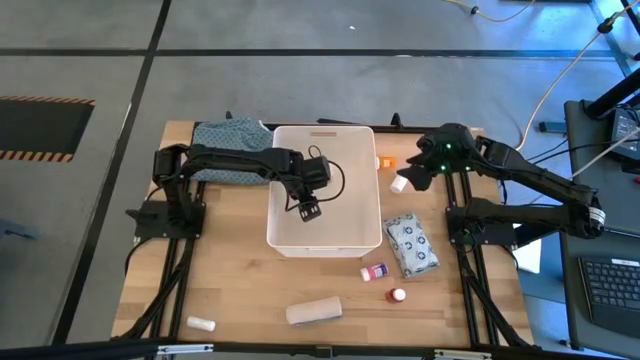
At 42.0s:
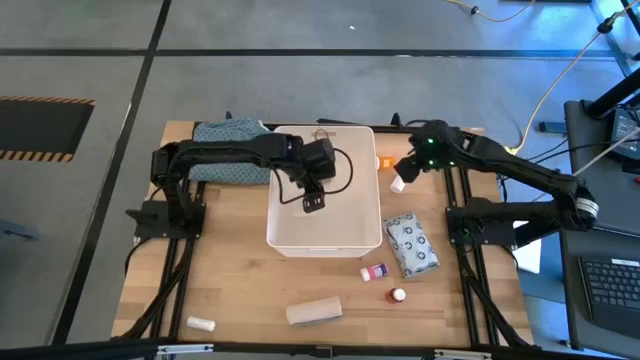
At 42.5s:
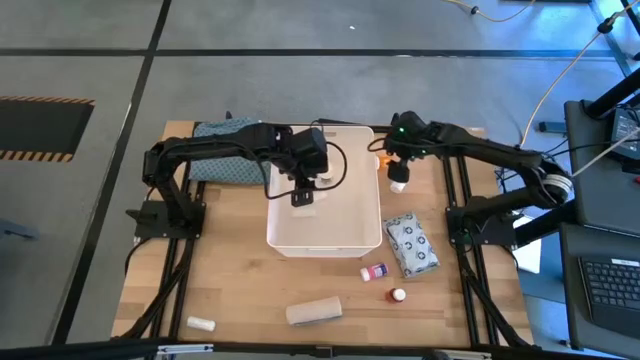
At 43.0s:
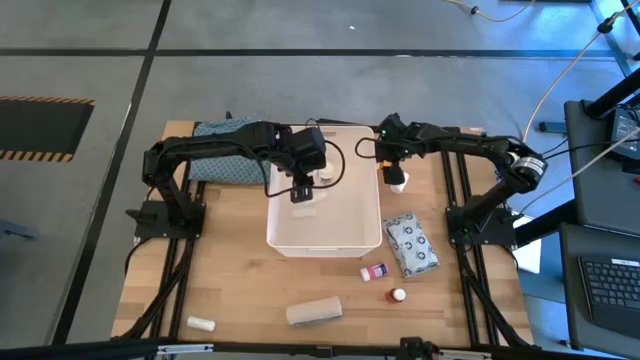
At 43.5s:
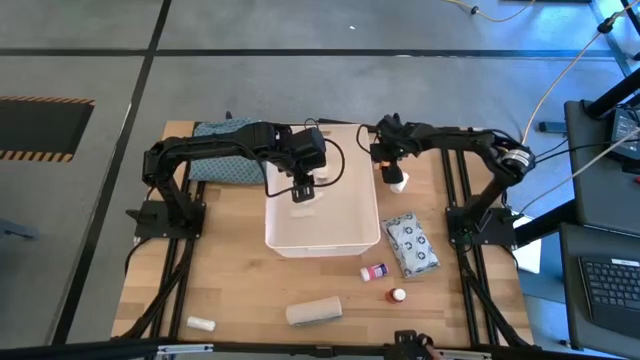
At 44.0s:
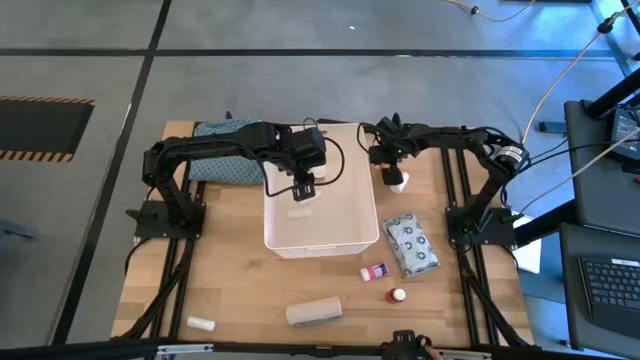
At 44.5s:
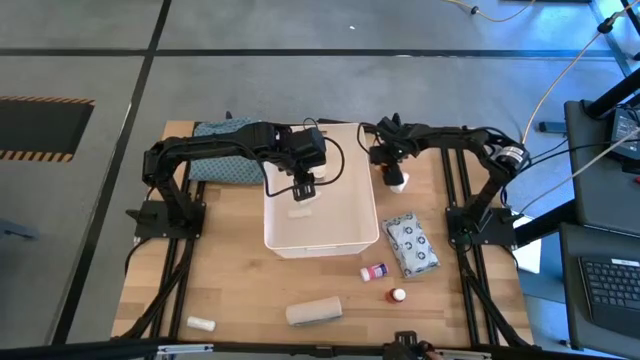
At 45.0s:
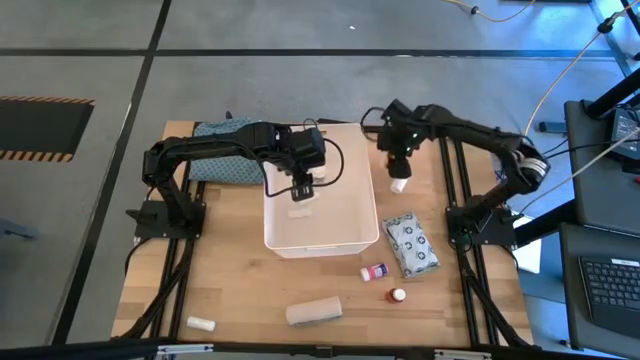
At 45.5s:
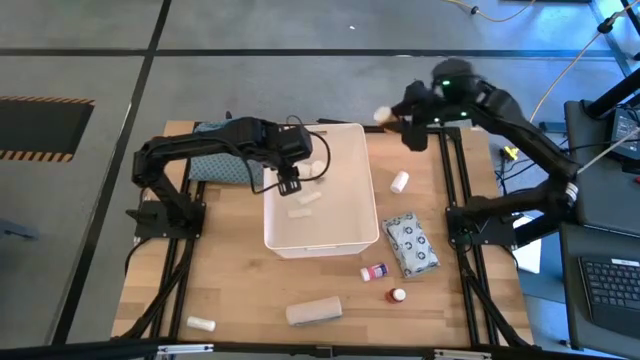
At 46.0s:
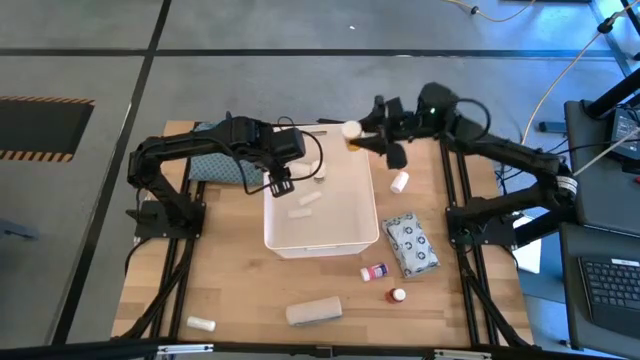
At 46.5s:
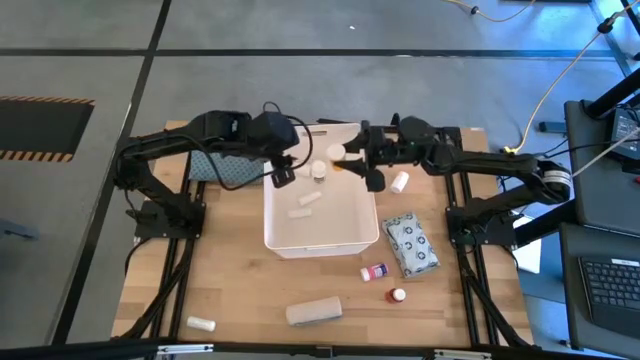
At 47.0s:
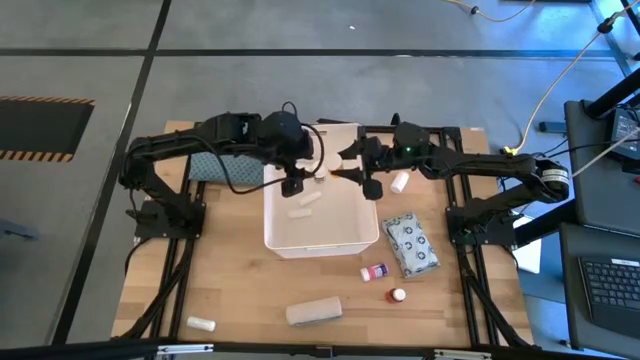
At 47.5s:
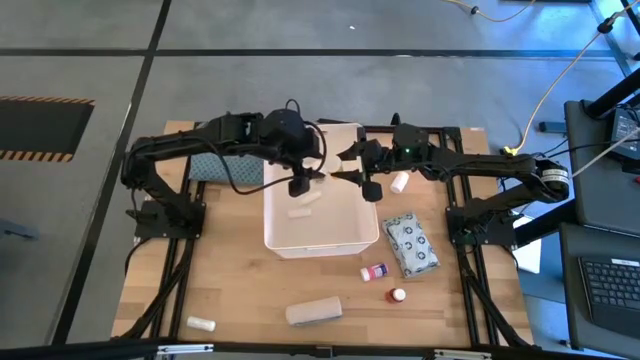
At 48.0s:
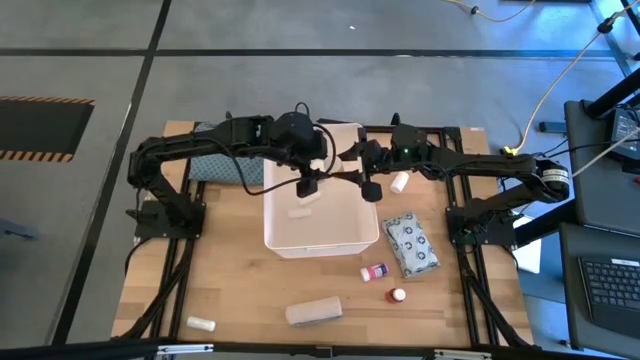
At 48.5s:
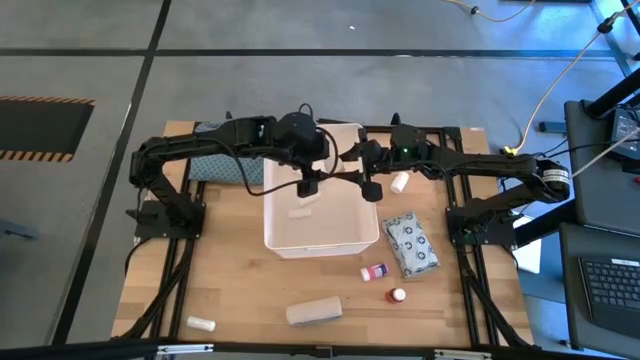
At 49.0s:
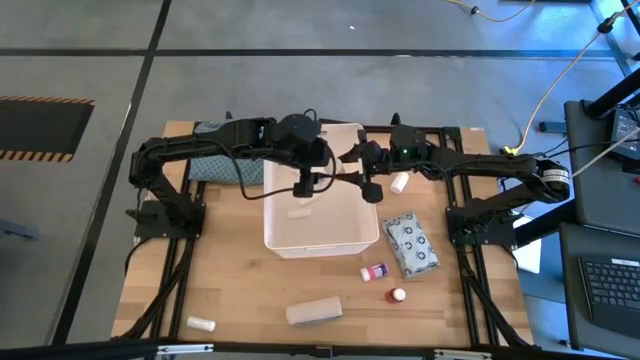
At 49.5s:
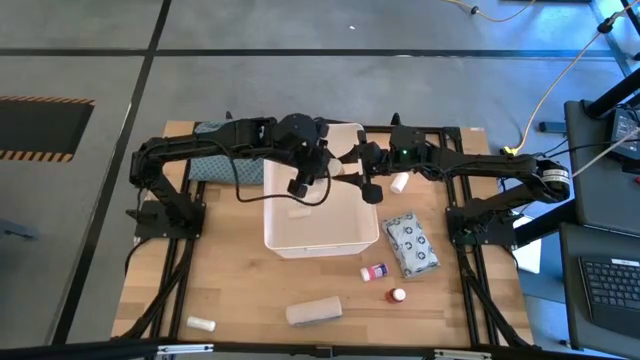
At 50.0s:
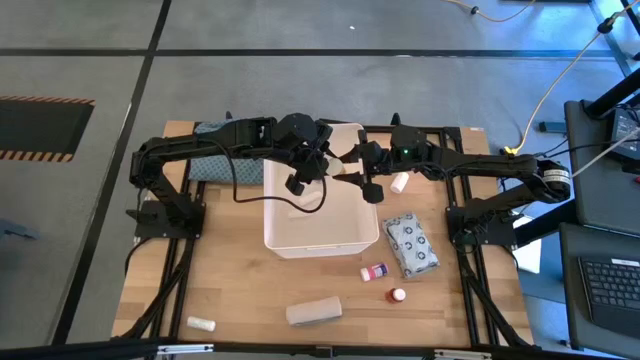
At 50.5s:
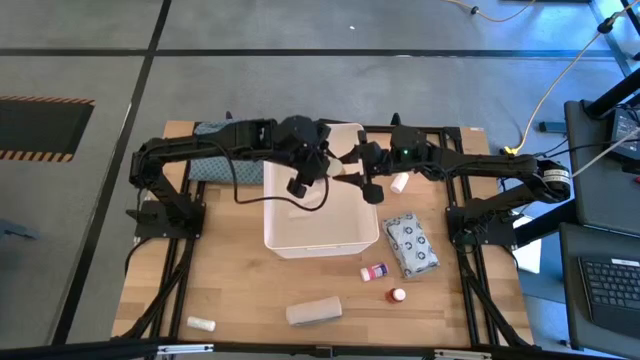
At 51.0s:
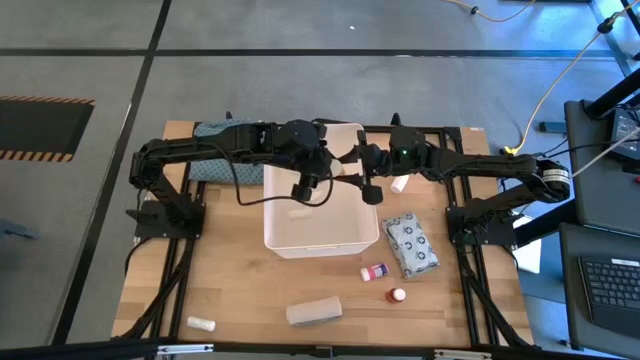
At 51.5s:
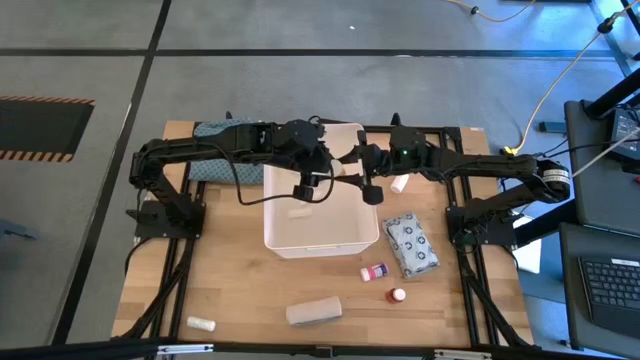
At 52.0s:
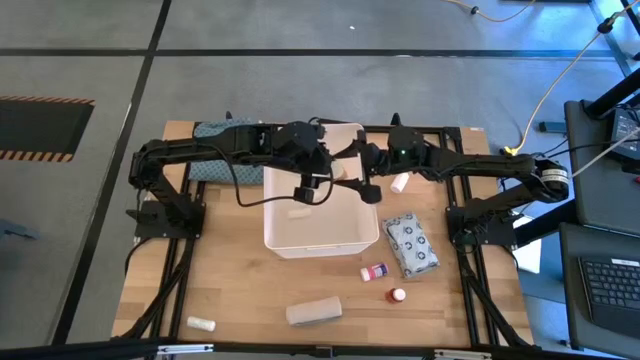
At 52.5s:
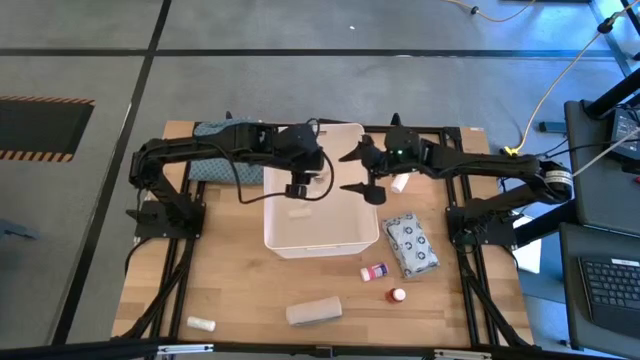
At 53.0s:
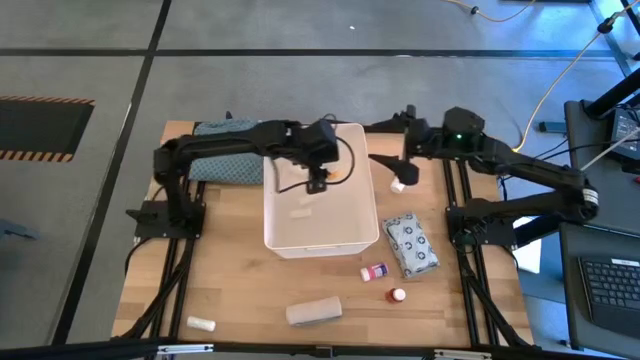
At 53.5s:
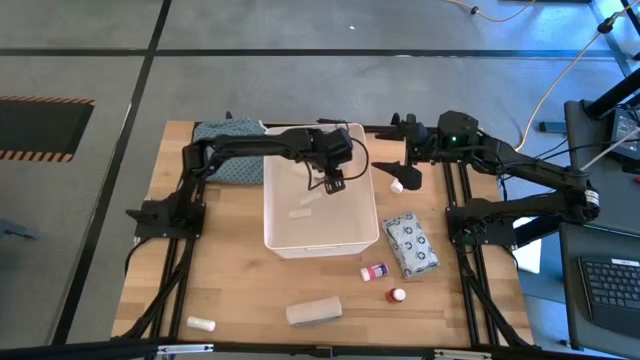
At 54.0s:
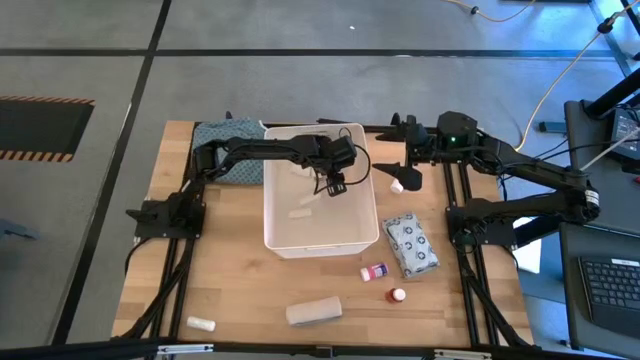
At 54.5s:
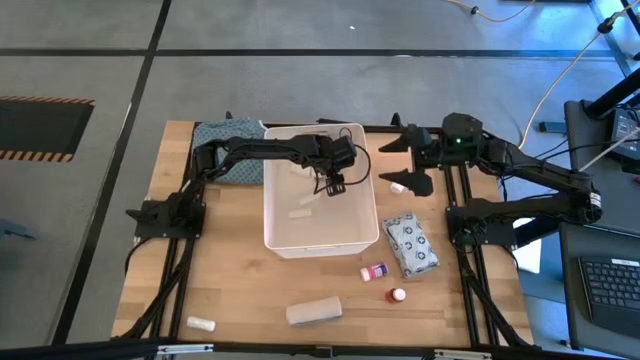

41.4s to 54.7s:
Task: Pick & place medical supplies in basket/bin
Put the orange pill bottle into the white bin

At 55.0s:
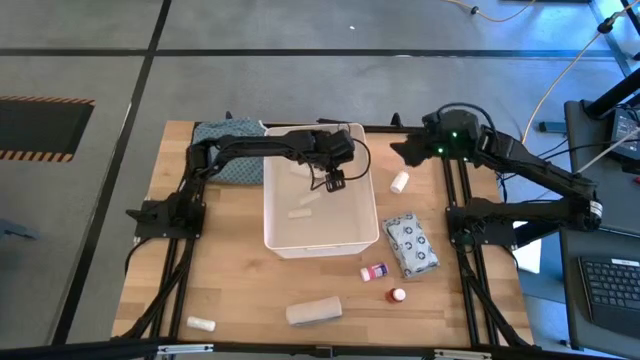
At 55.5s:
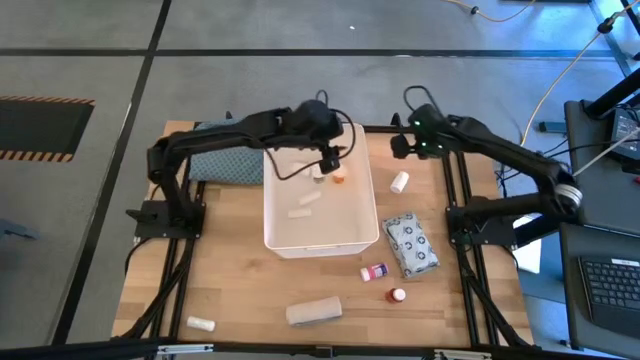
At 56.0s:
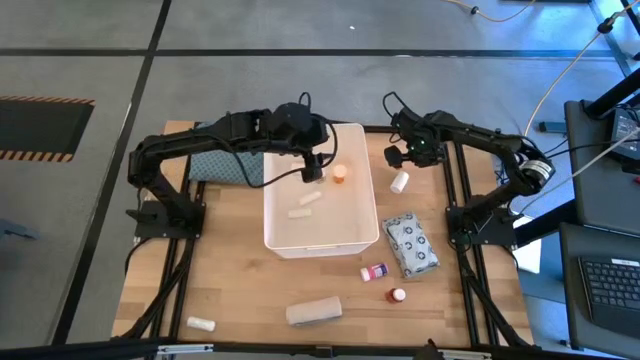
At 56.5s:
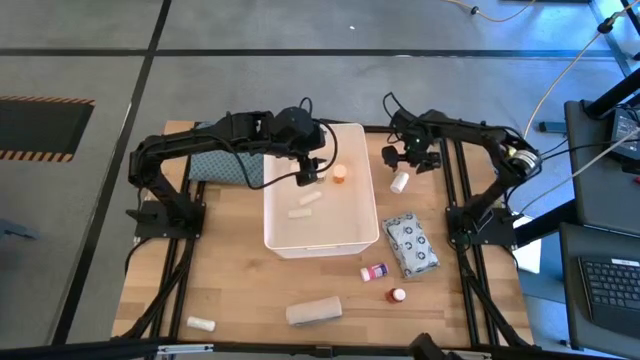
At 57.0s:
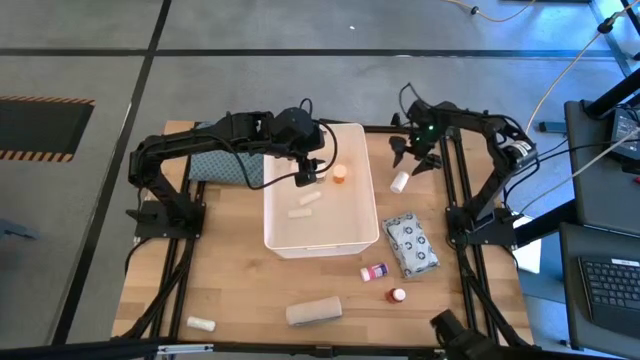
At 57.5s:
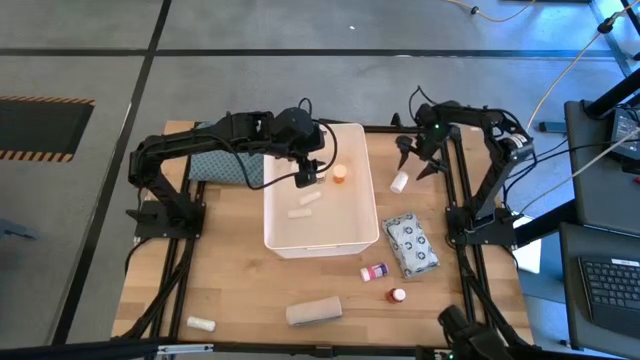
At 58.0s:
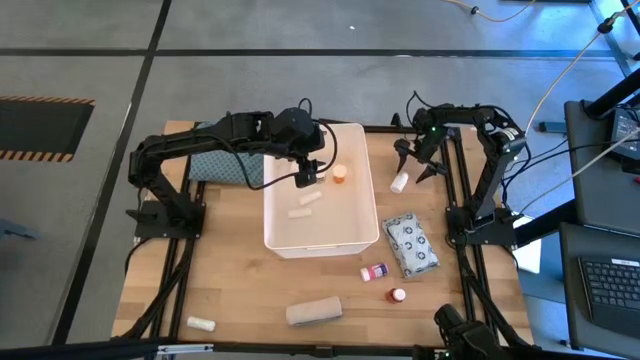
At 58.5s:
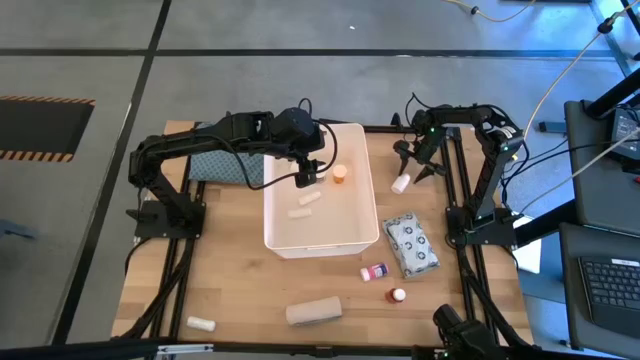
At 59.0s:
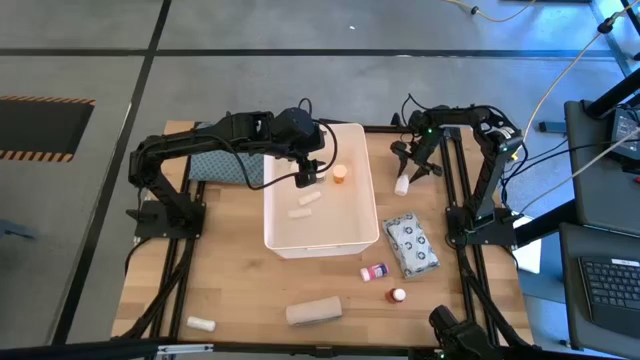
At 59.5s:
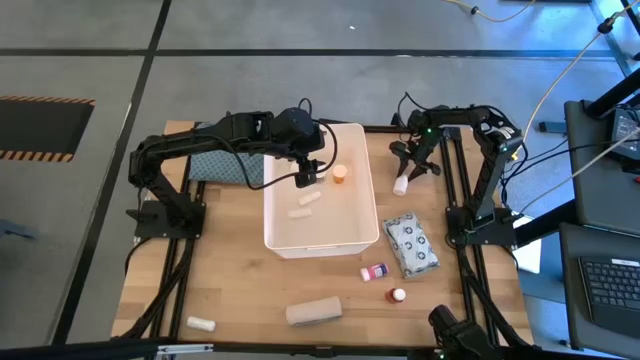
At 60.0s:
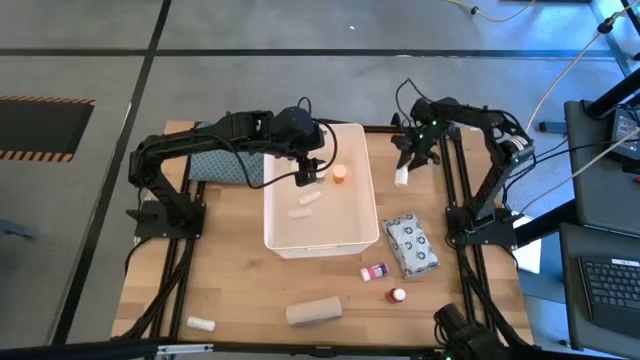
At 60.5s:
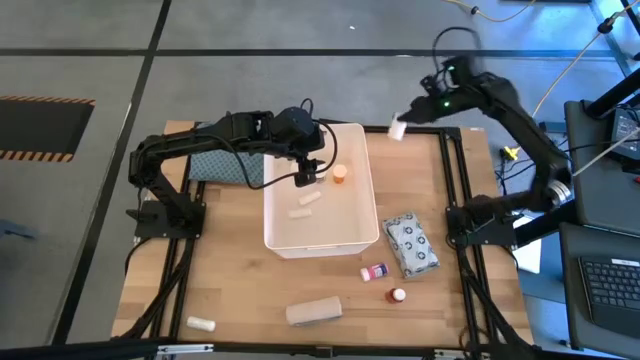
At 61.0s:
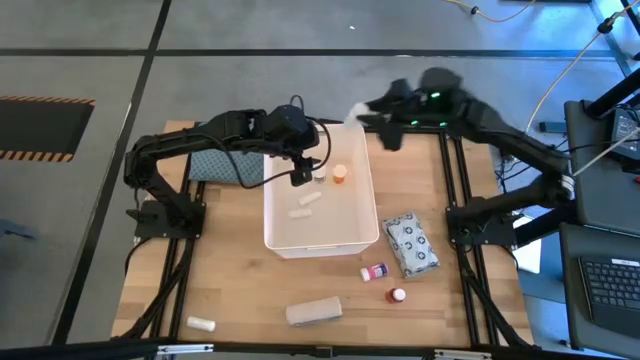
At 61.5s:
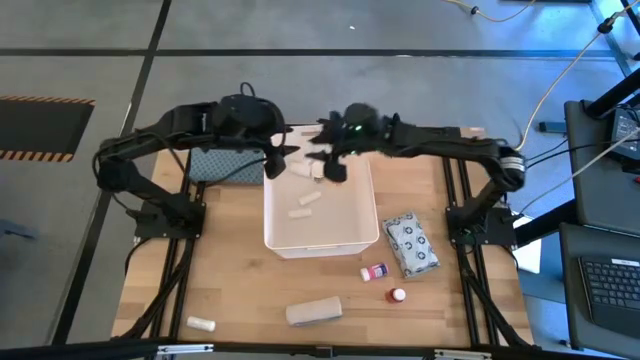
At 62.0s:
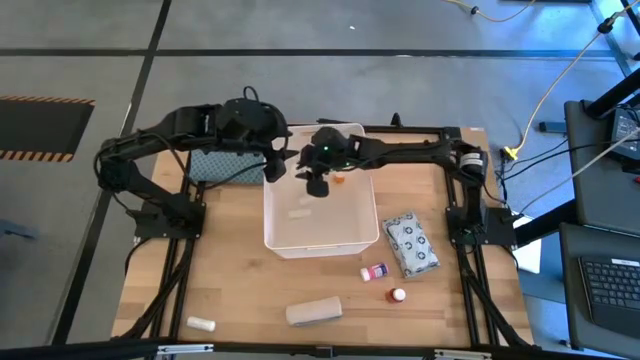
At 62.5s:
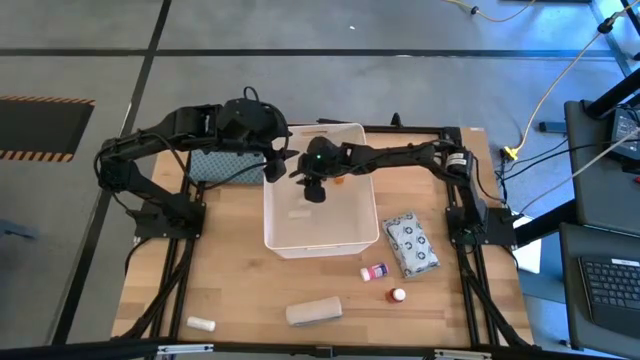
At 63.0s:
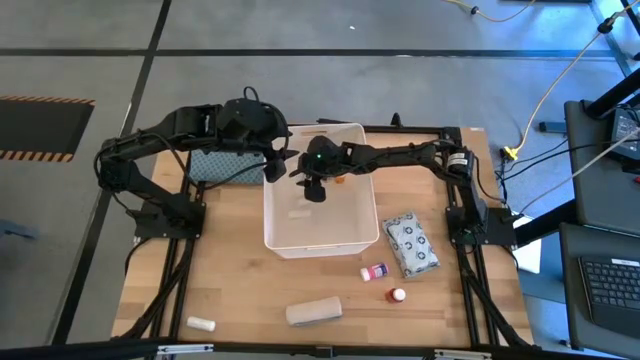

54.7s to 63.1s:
Put the white medicine bottle into the white bin
